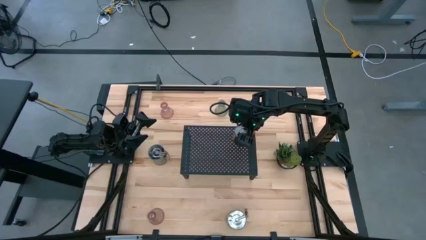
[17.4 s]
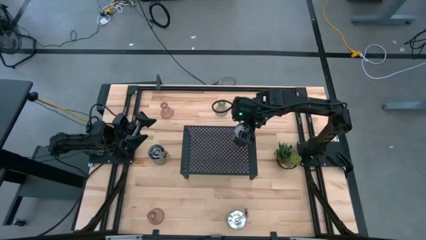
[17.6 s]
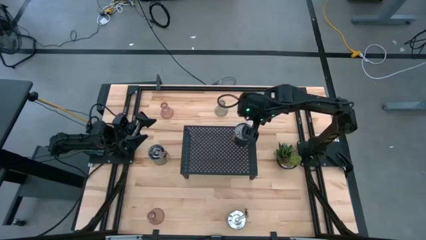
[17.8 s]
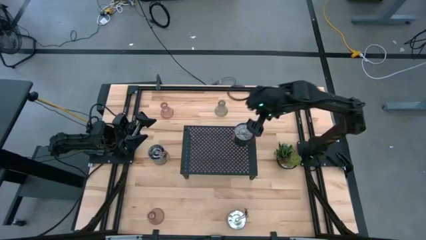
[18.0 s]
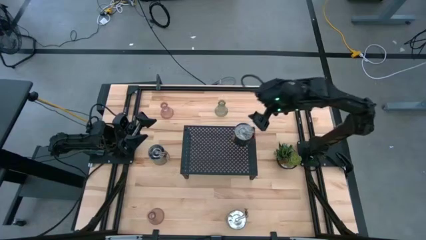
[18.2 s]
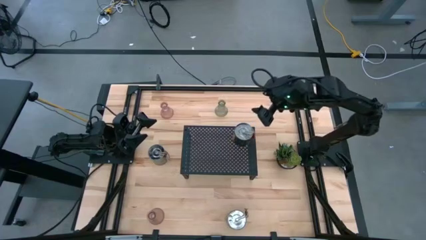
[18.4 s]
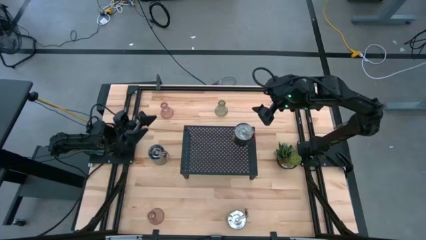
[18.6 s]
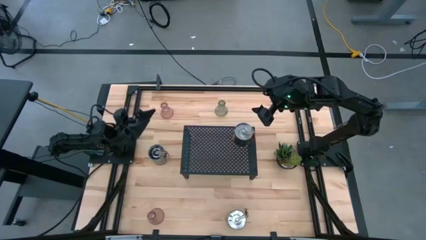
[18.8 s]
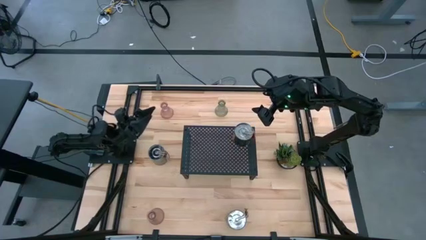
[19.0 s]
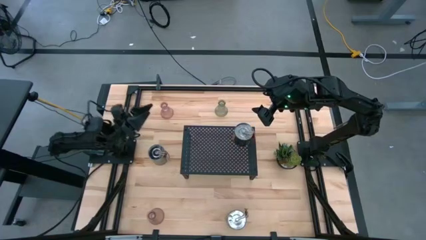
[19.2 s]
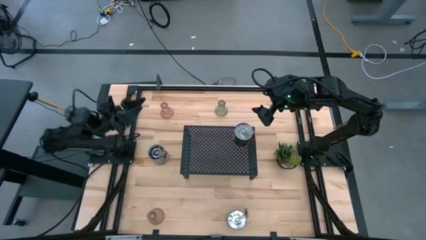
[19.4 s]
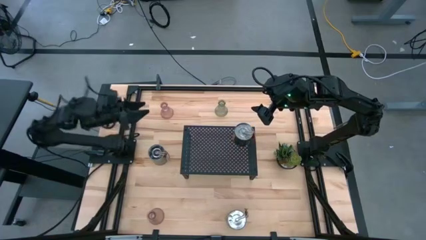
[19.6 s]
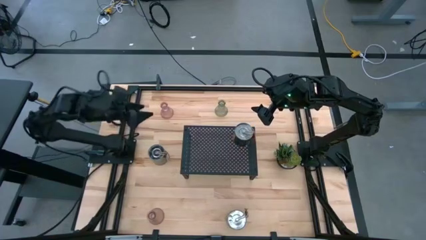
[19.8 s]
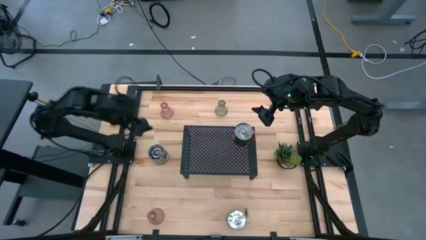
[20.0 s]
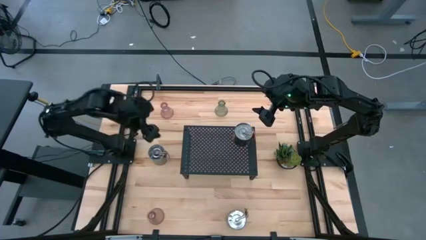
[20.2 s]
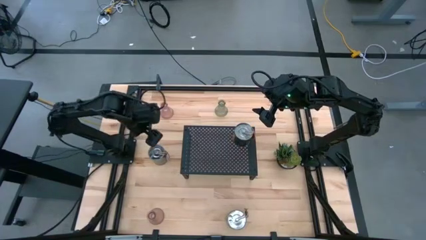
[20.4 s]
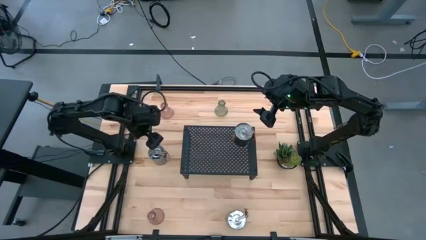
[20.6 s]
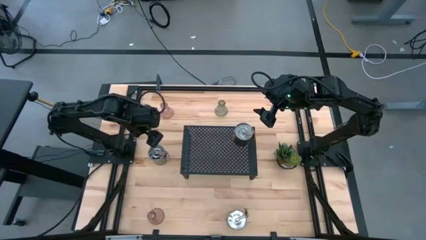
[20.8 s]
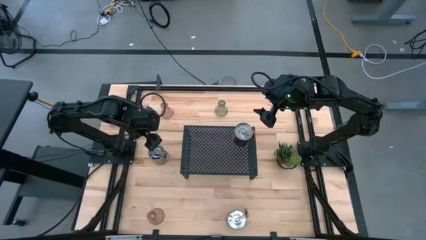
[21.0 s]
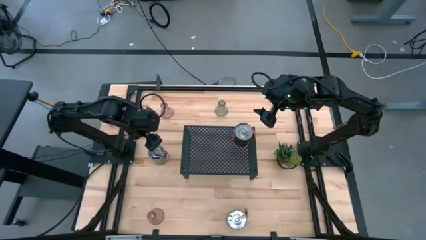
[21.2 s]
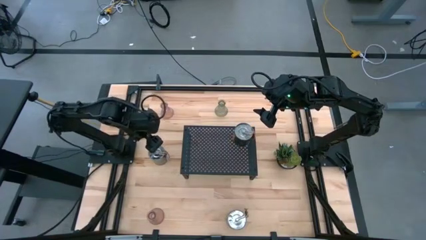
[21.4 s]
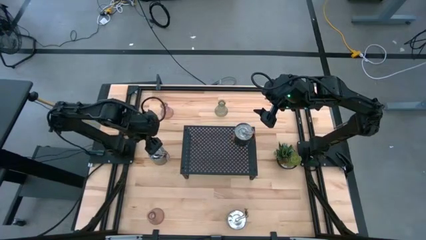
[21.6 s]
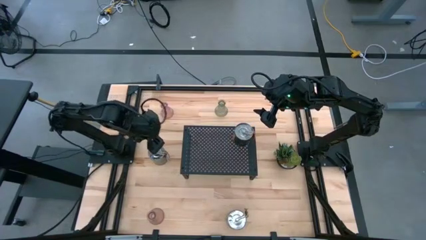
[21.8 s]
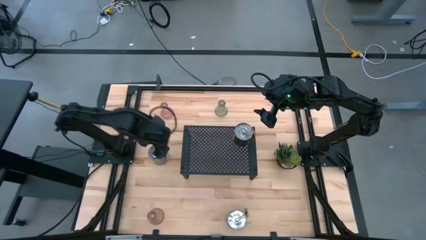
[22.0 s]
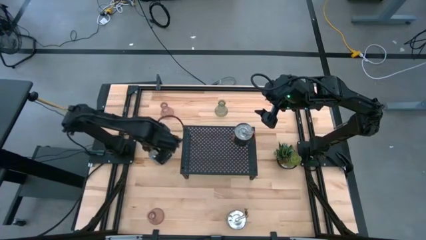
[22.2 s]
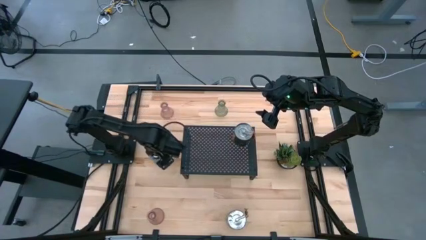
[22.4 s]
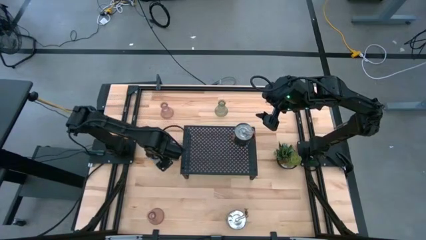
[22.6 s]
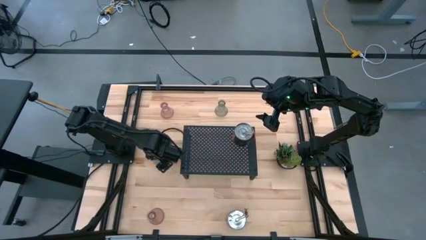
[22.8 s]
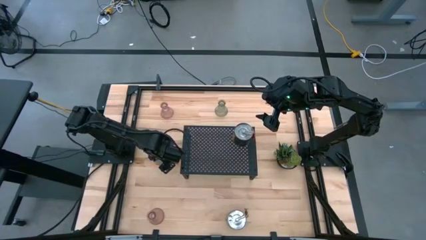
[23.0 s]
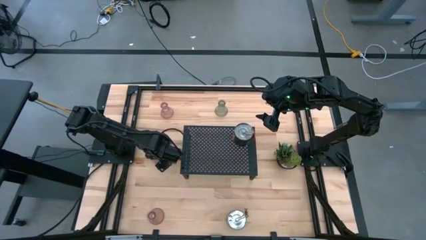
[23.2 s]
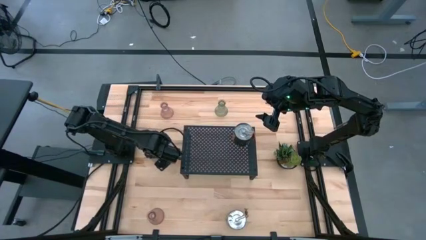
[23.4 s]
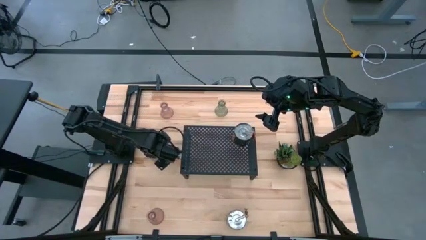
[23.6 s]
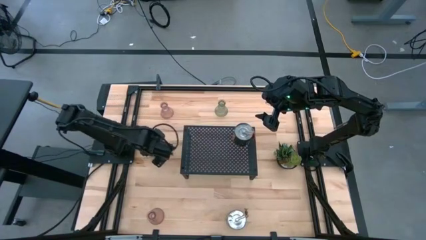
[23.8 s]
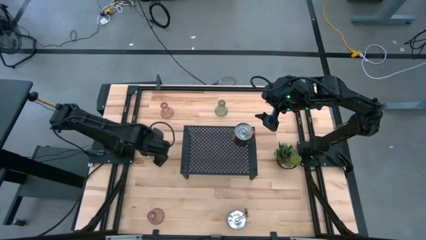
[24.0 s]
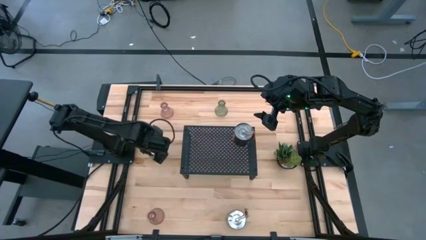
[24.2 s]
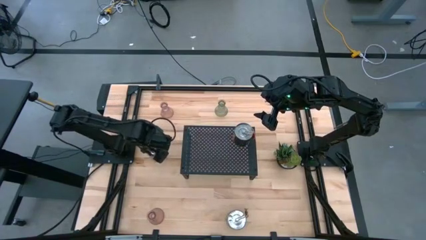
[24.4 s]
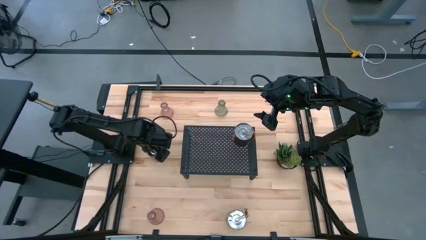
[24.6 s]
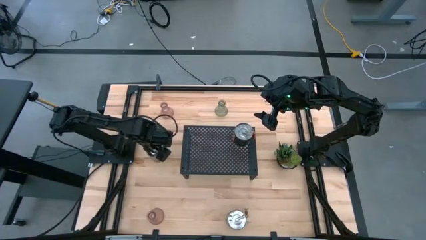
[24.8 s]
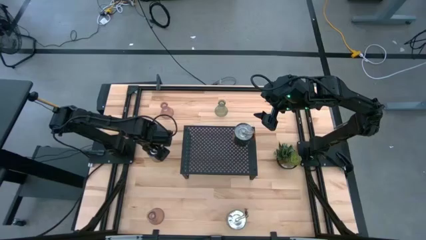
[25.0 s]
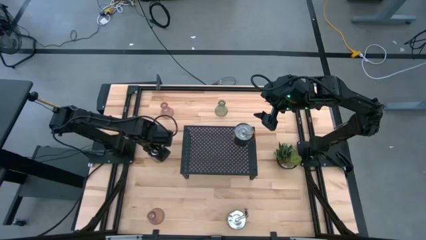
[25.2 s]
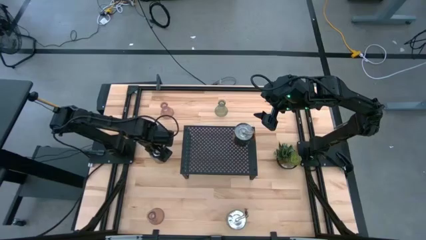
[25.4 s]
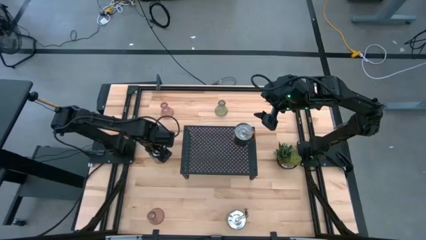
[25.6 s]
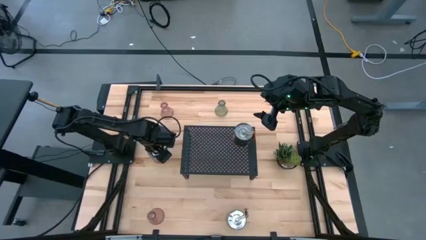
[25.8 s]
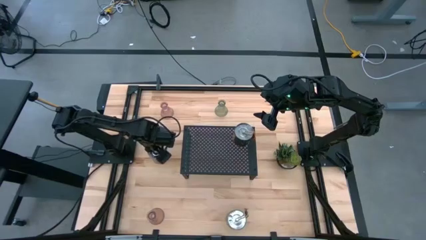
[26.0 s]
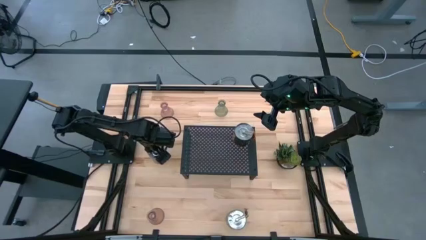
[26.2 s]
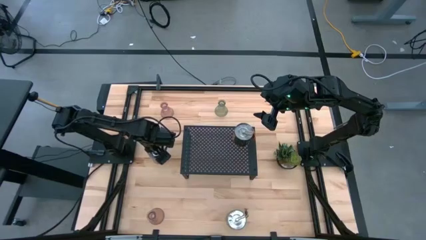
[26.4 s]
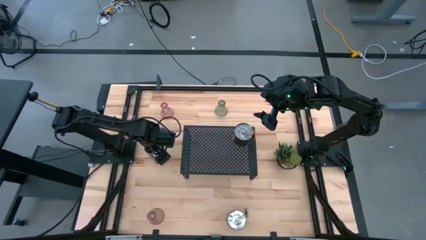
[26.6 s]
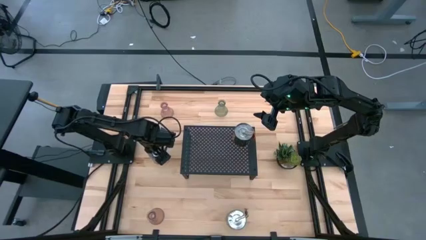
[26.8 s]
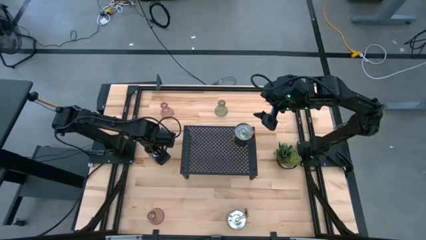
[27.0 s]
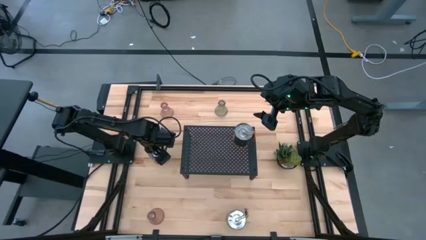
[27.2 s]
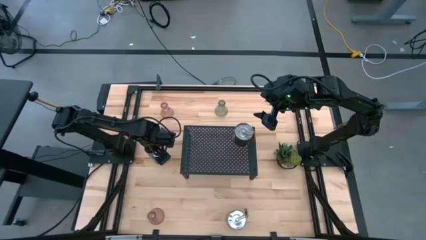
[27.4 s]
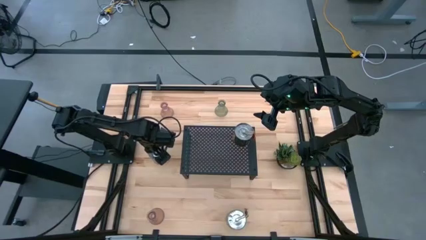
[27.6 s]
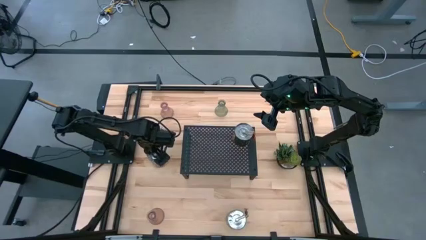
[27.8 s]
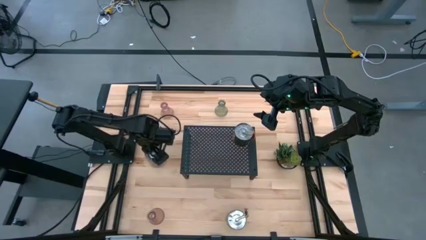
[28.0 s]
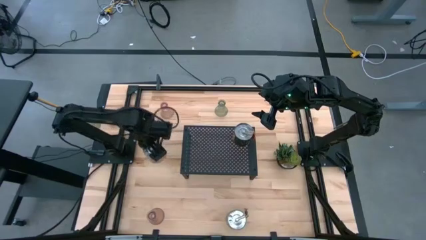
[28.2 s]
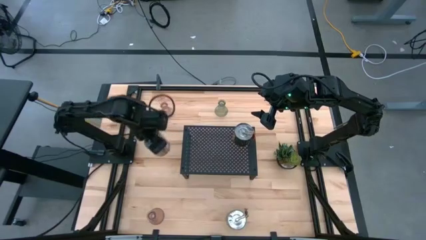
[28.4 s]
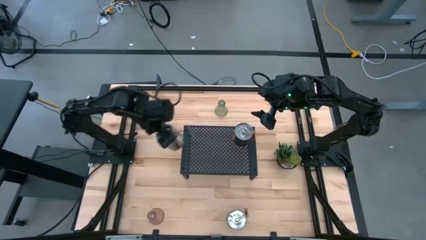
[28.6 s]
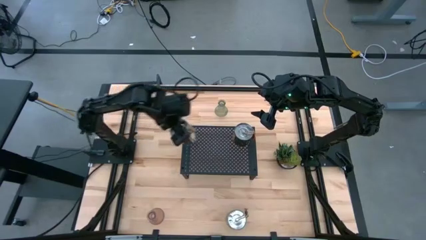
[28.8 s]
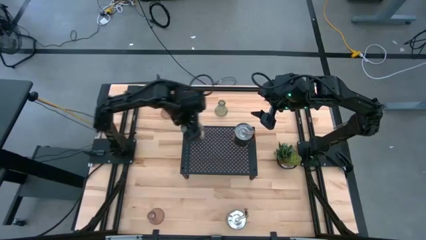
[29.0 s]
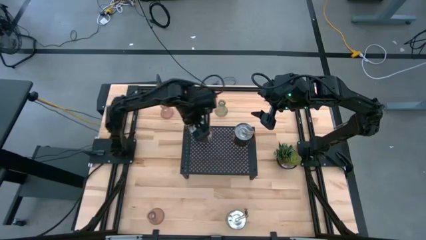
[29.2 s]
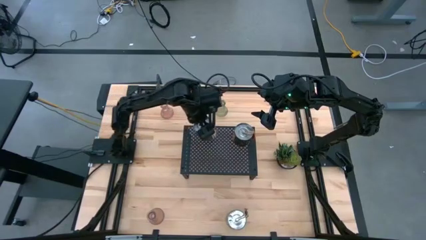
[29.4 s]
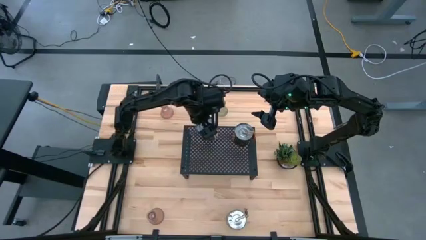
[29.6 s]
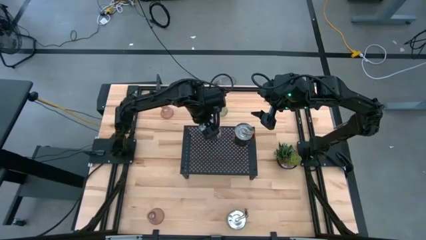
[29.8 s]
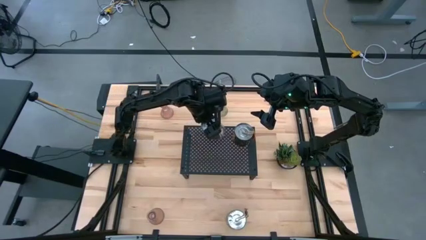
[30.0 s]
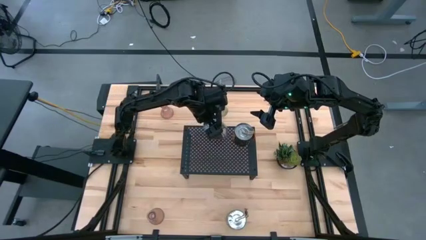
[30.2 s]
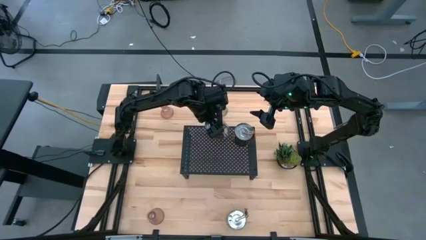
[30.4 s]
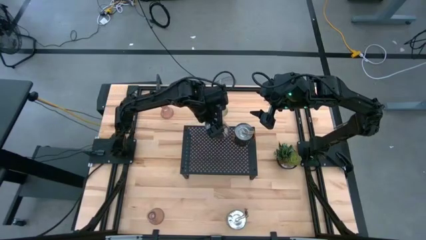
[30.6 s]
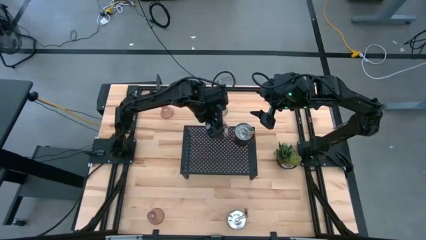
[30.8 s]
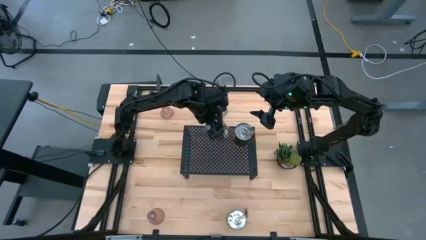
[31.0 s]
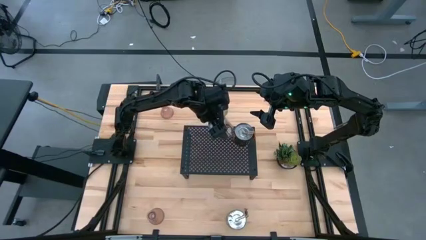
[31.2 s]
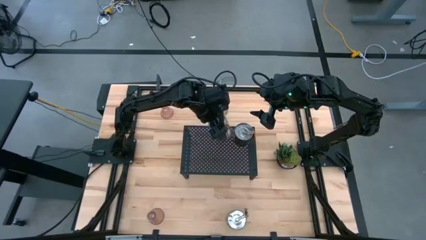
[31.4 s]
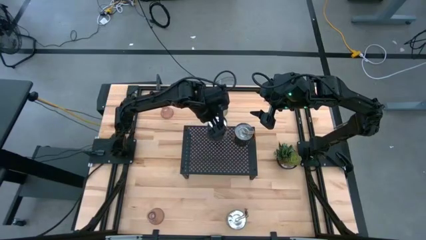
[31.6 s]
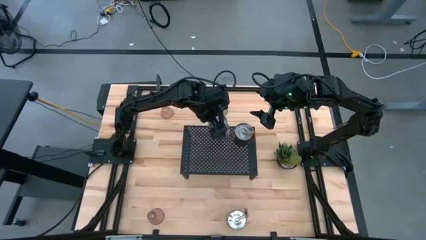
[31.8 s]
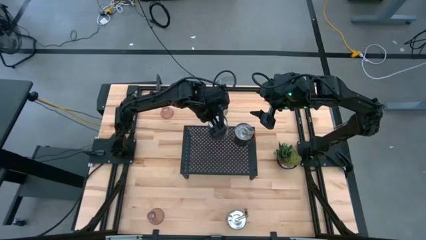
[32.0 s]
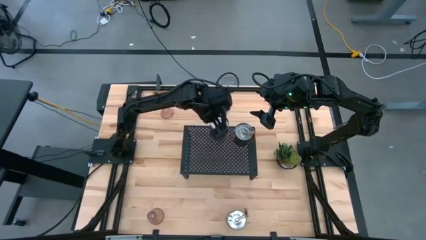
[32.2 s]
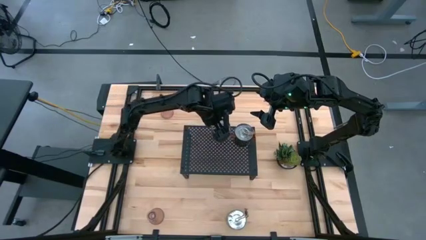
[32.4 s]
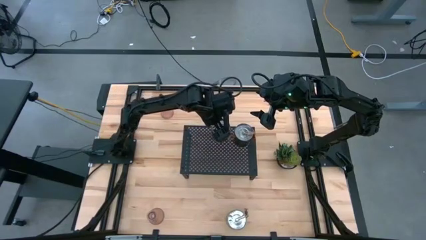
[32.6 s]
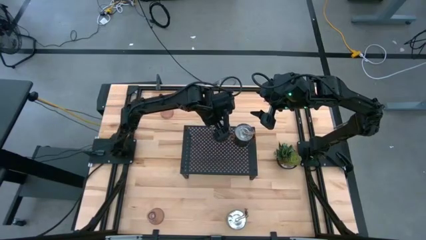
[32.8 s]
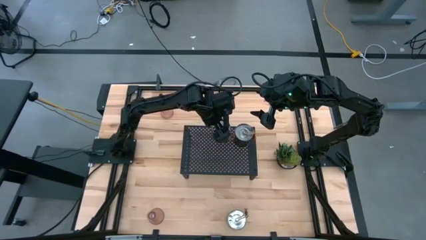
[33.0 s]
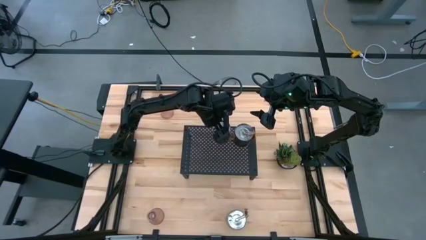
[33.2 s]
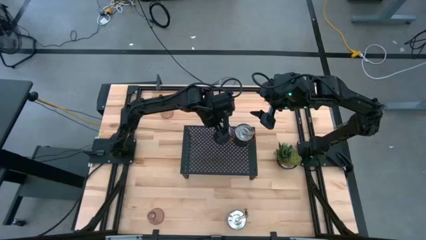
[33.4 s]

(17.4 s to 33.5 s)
Task: Pick & Place candle stick holders
Put the top brown scented candle on the shelf aligned with the other scented candle
